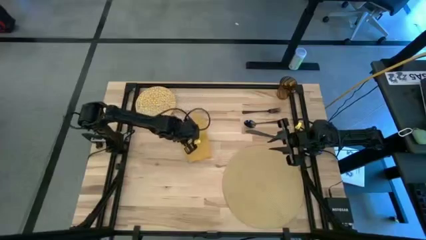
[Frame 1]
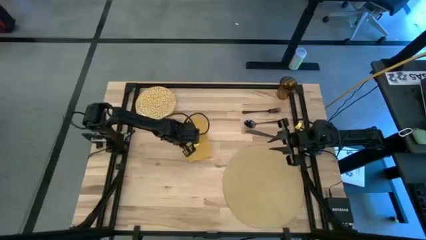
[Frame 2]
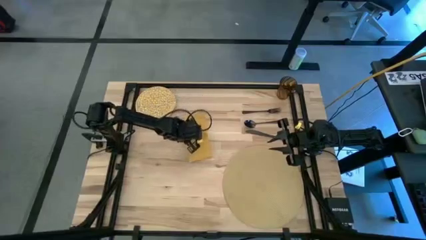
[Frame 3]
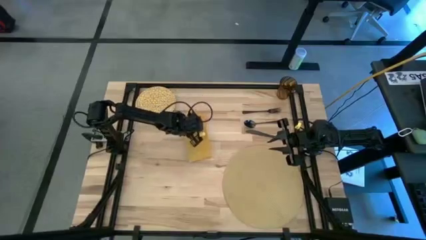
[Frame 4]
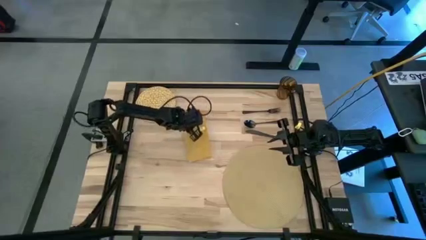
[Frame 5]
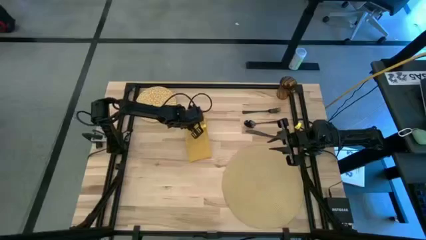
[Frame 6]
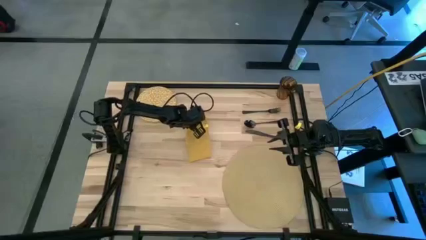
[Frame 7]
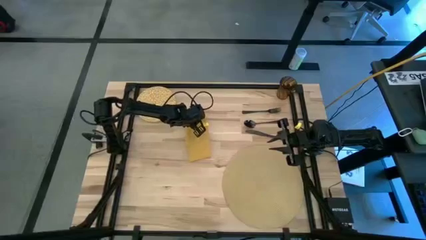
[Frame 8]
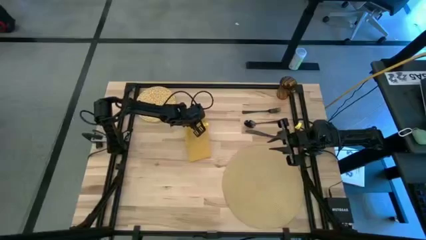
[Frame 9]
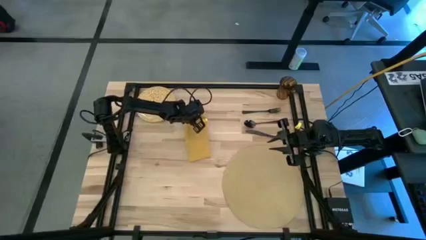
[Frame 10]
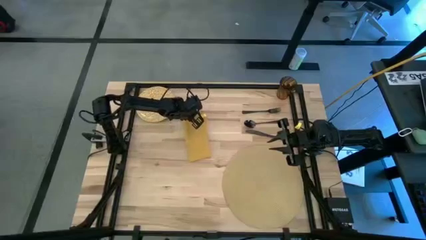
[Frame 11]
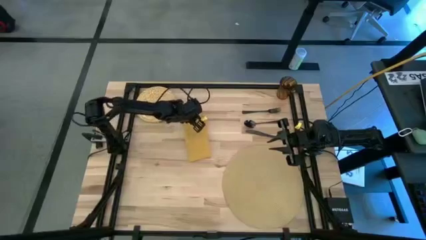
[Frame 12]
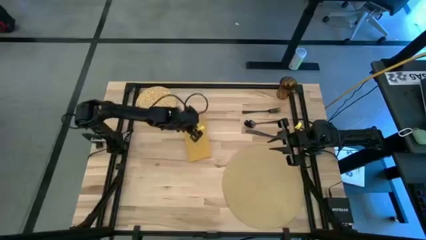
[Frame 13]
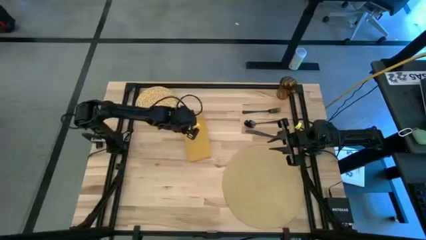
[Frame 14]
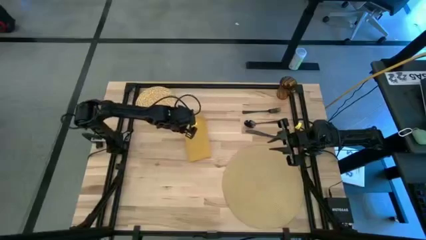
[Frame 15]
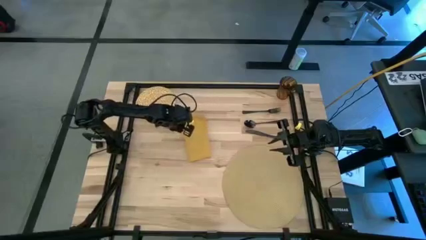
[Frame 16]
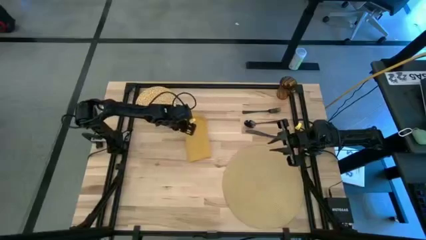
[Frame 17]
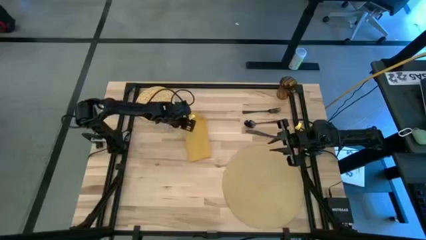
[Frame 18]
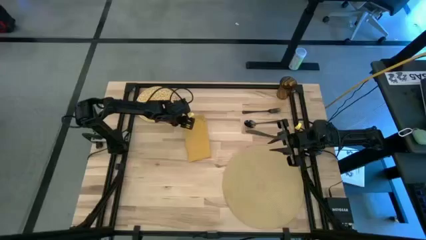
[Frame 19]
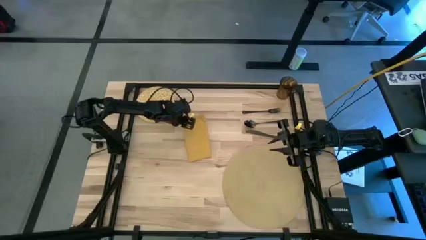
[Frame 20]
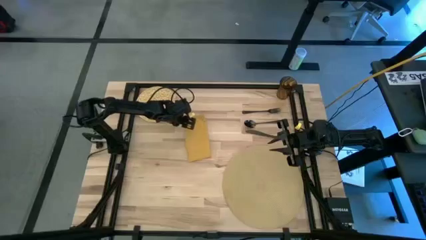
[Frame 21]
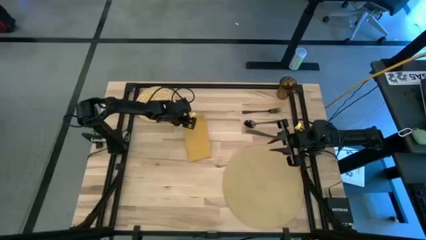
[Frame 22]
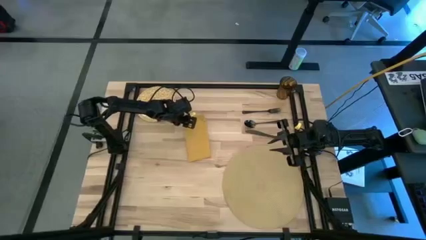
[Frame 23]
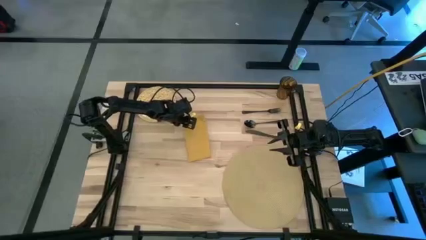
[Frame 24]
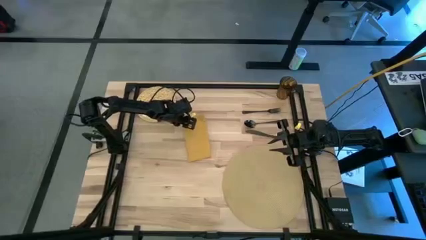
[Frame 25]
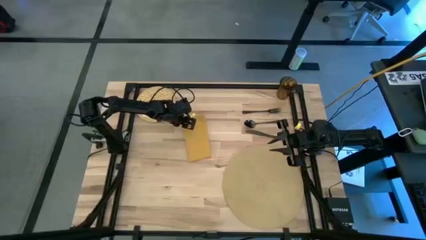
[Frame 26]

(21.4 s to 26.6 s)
Task: Set table place
Fold the yellow table napkin

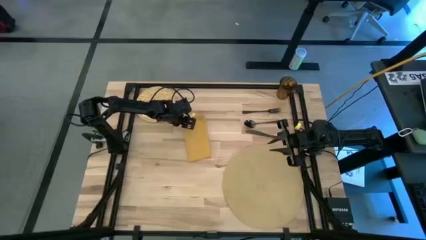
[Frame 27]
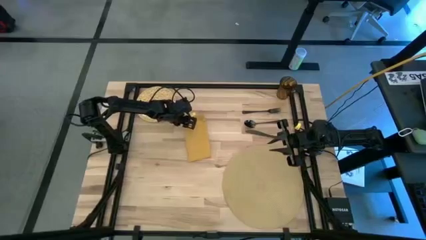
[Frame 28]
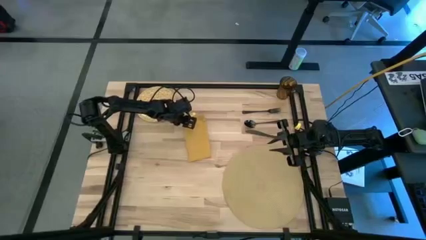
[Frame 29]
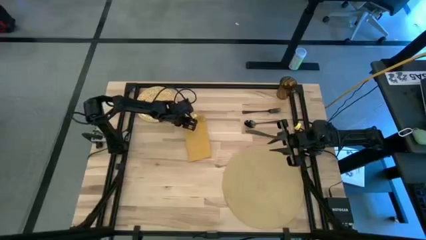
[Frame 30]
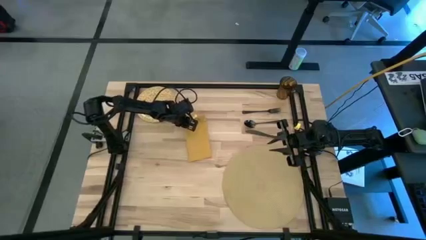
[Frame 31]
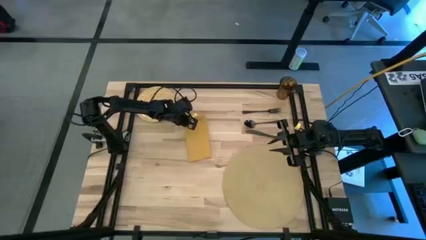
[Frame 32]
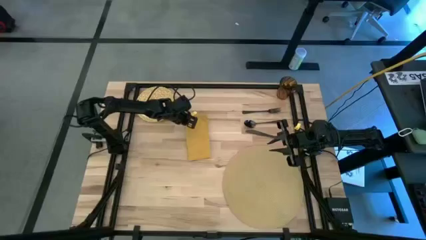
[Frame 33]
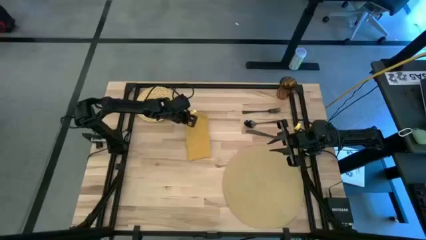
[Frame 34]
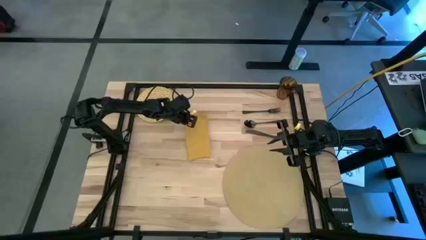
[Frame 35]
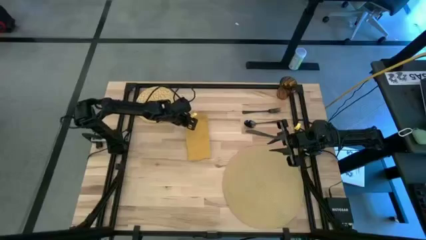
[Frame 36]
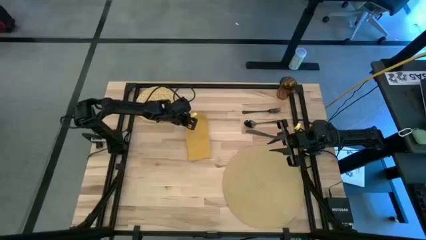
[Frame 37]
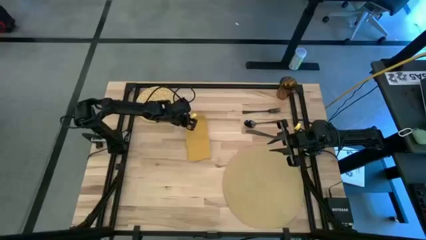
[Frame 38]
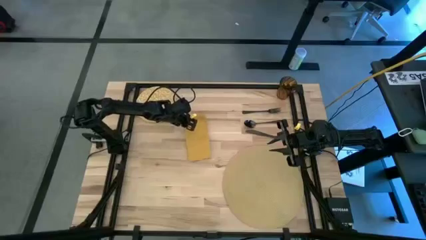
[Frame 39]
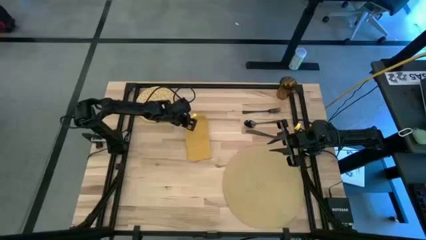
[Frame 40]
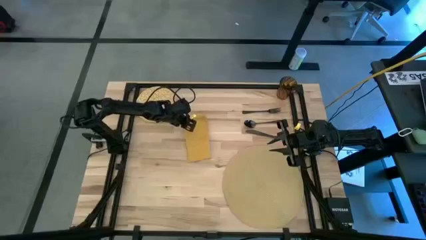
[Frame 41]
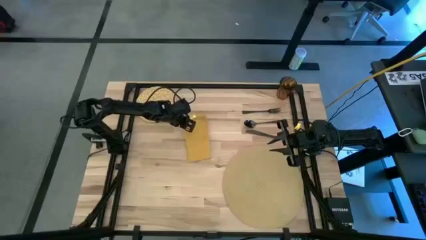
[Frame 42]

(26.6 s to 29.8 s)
Fold the yellow table napkin

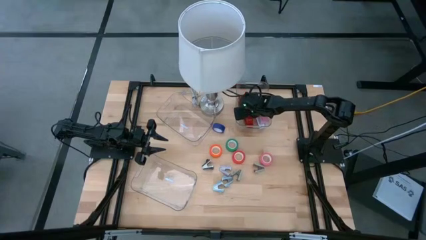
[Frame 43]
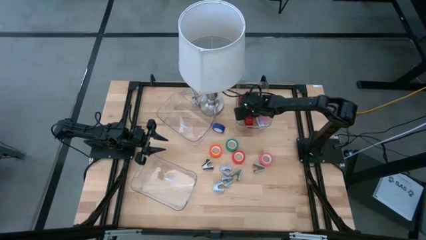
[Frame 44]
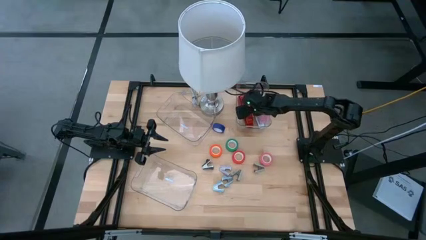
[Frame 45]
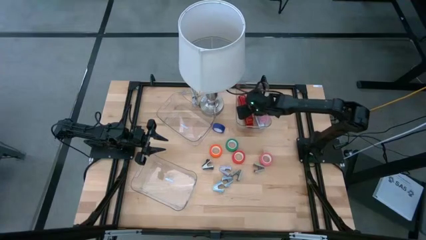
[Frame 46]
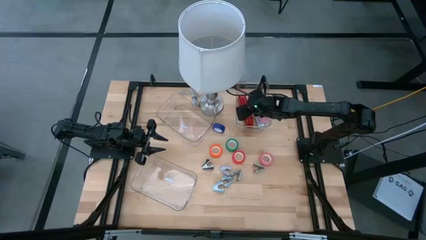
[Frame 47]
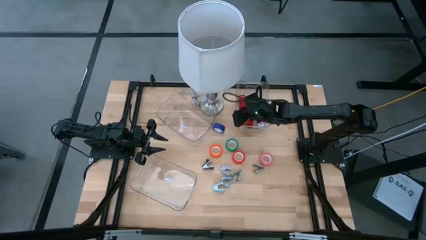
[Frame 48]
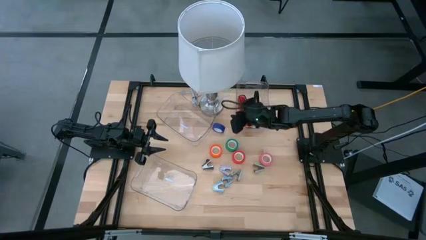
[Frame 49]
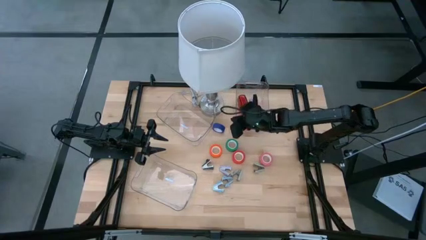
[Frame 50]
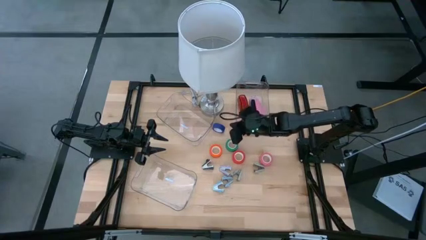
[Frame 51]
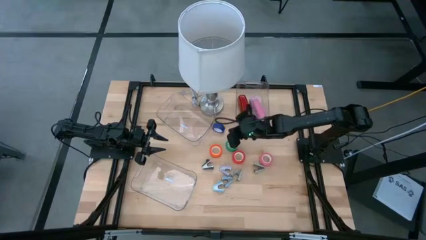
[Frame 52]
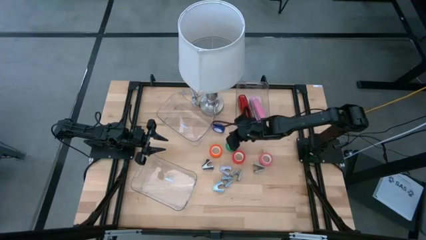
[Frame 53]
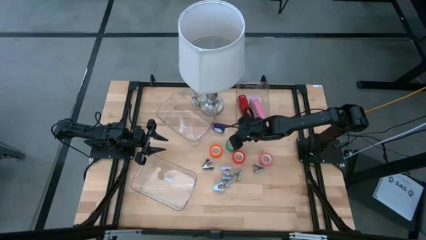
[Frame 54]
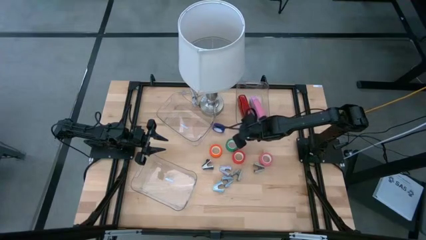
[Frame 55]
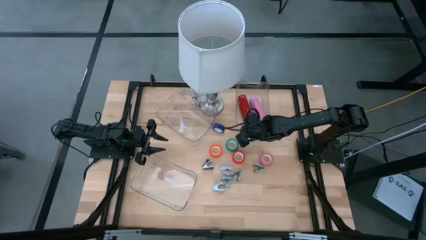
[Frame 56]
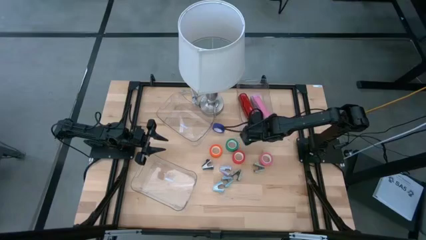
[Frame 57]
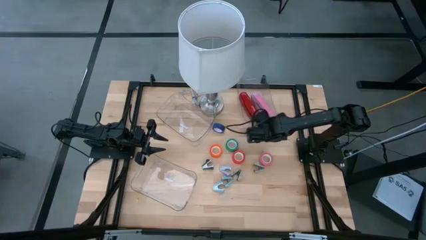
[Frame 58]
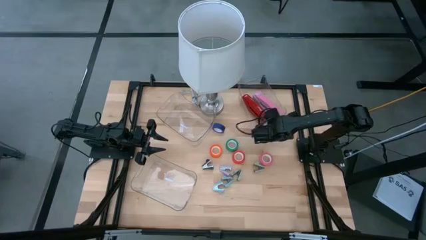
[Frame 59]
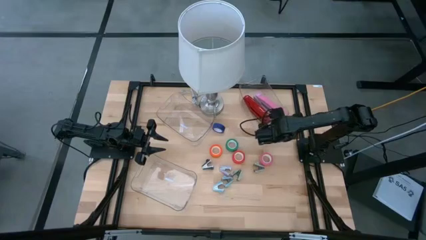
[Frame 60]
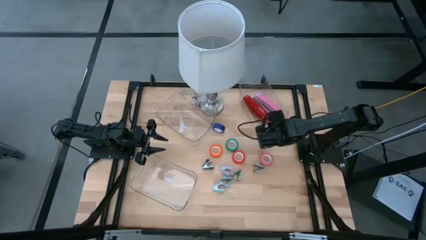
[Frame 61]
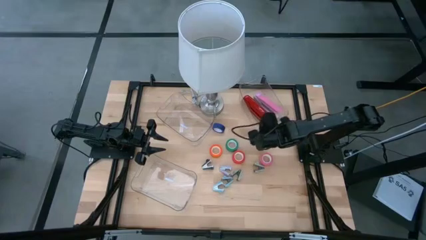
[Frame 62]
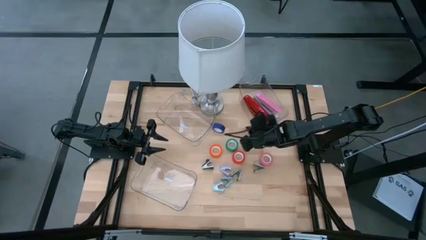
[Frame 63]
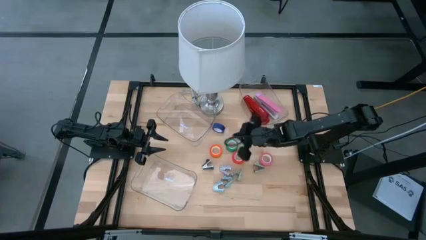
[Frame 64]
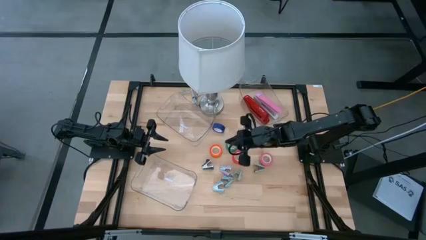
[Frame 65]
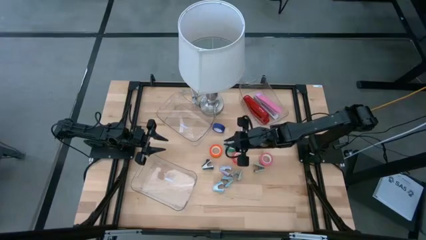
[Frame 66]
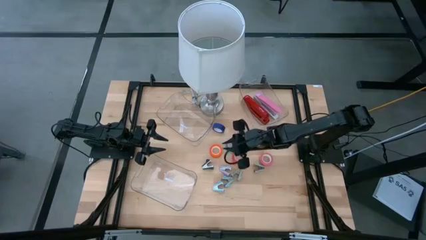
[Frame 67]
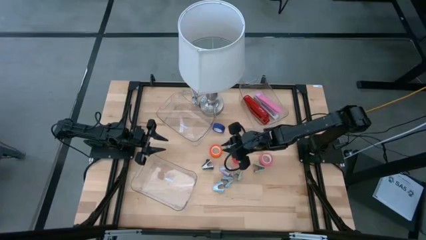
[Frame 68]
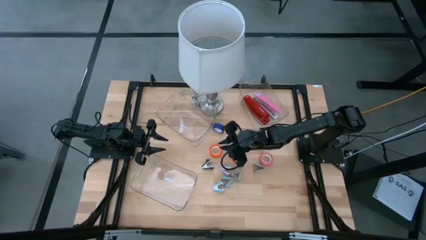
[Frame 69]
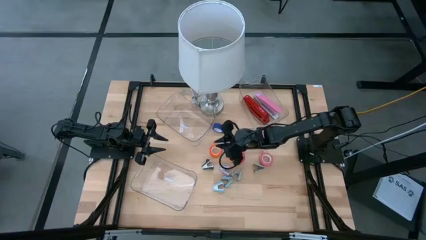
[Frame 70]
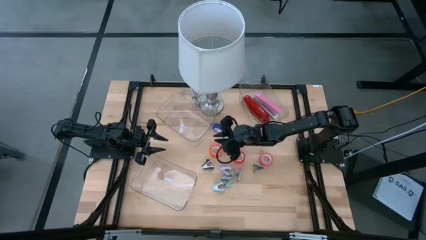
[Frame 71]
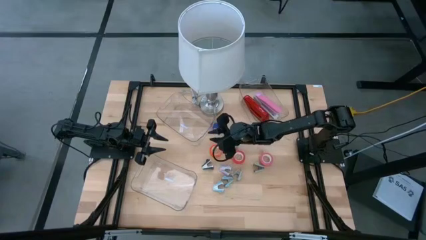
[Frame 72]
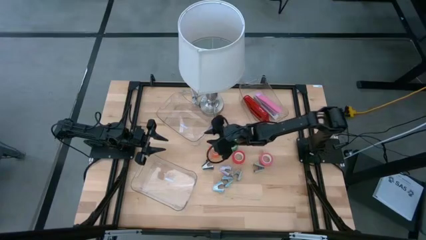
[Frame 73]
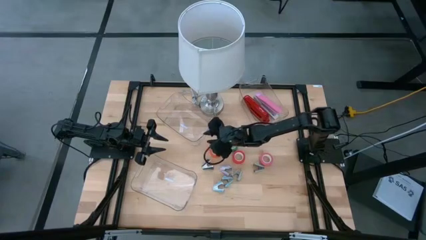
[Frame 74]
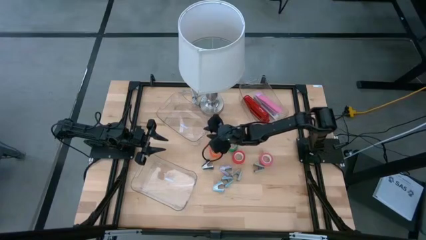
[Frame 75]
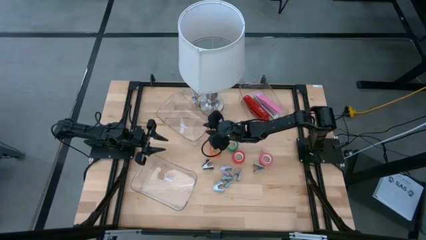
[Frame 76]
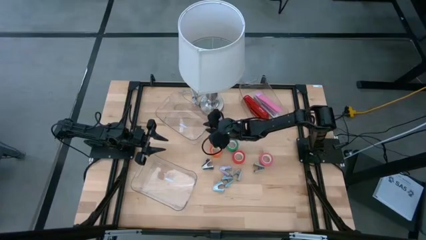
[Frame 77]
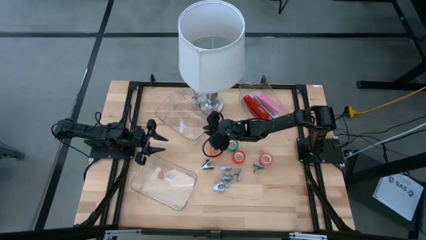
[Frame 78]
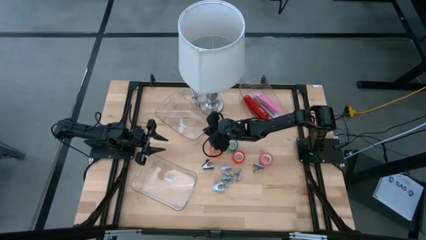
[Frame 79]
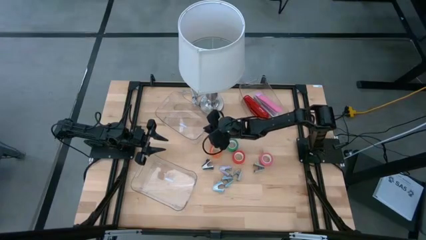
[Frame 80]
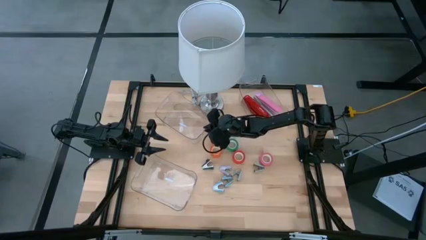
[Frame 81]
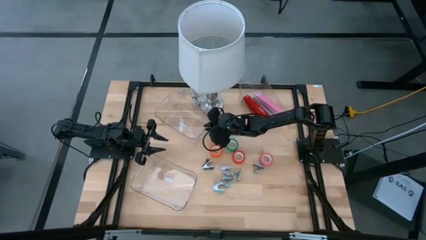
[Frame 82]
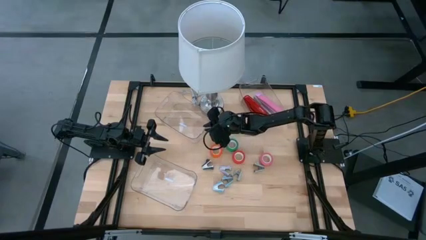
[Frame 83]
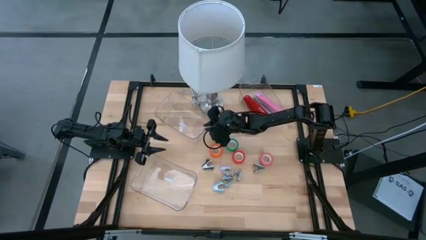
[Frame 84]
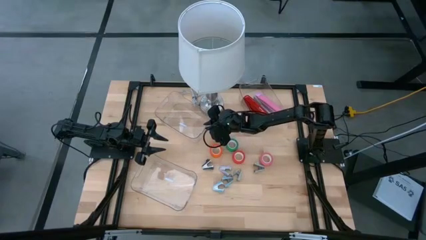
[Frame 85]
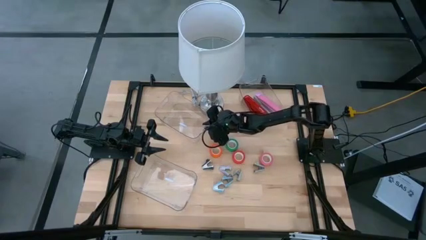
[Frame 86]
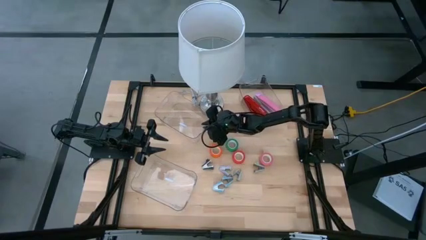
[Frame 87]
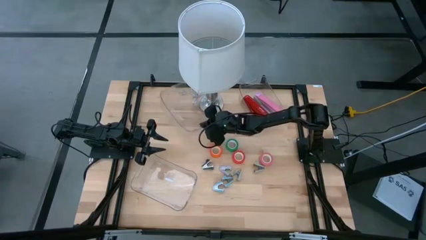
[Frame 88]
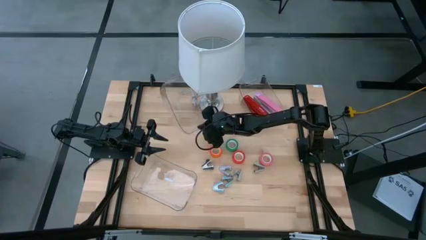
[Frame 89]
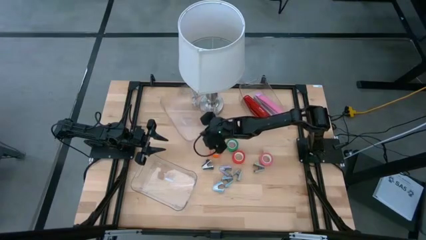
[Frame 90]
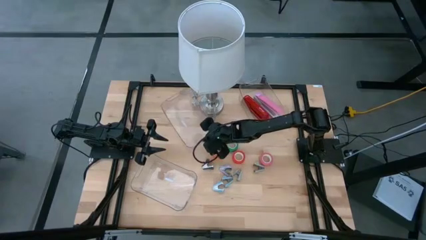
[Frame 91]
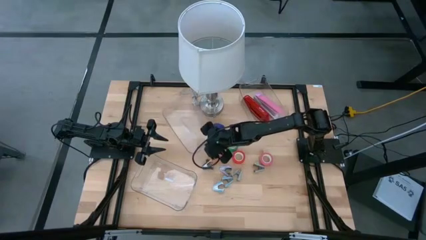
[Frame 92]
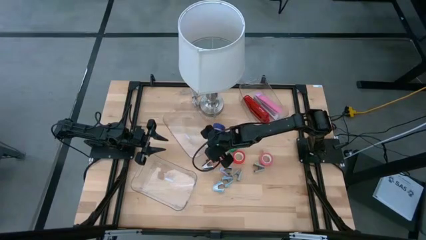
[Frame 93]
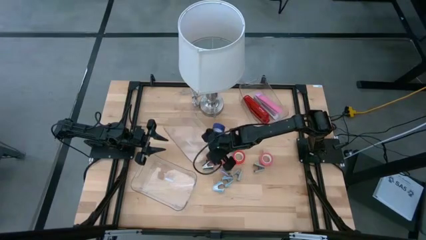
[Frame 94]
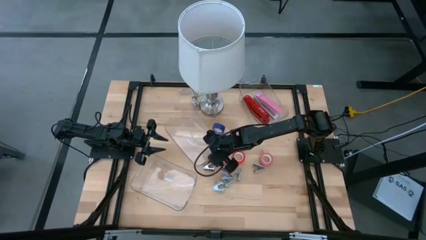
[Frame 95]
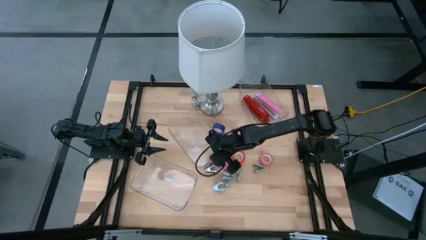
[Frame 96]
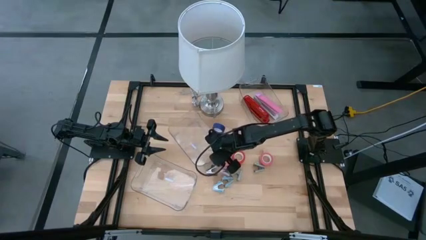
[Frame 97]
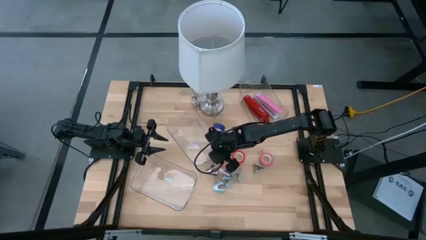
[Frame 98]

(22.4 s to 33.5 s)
Task: Pick and place Stapler, Stapler remover, tape
Adjust the transparent bins
